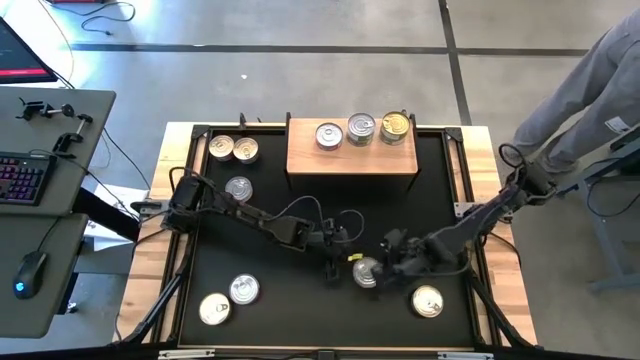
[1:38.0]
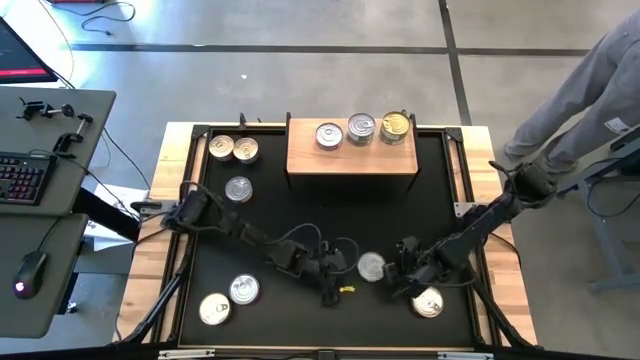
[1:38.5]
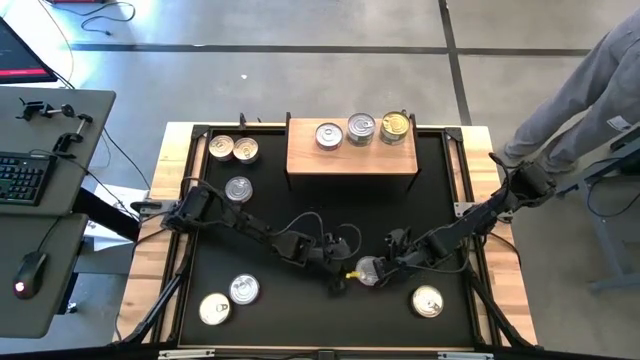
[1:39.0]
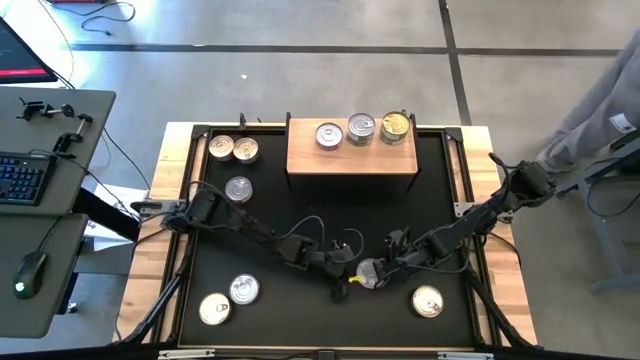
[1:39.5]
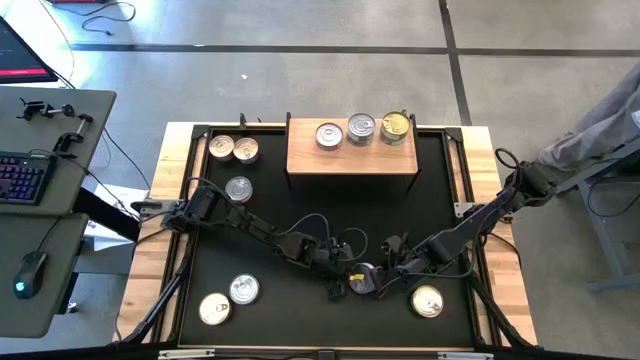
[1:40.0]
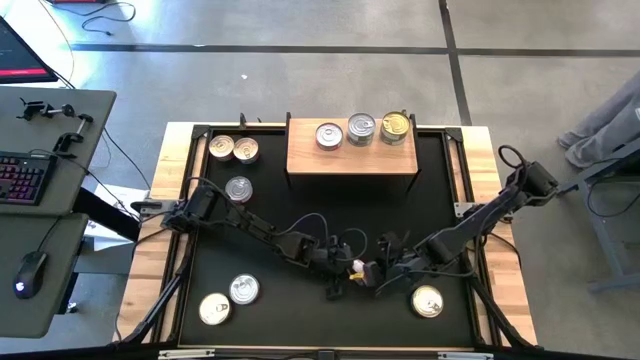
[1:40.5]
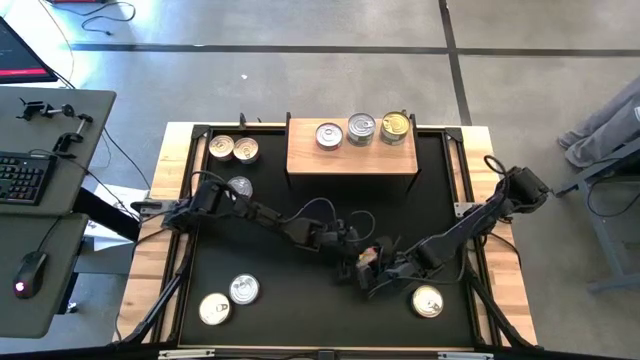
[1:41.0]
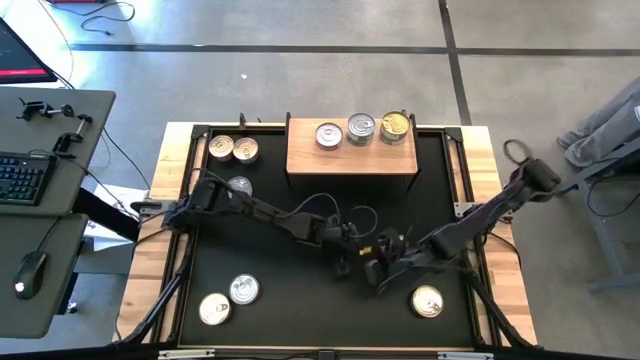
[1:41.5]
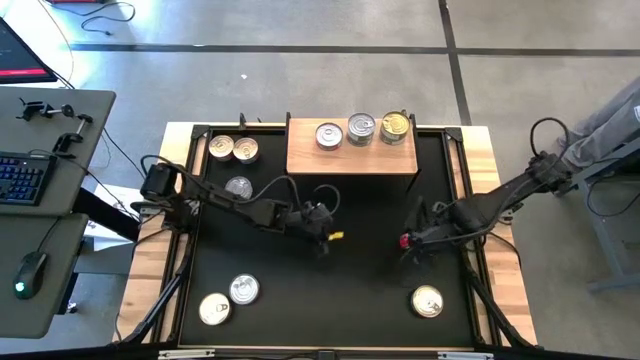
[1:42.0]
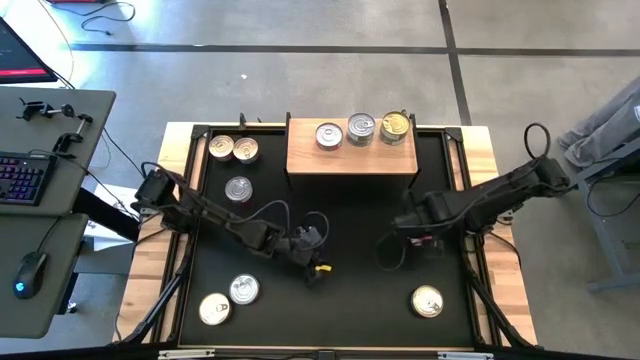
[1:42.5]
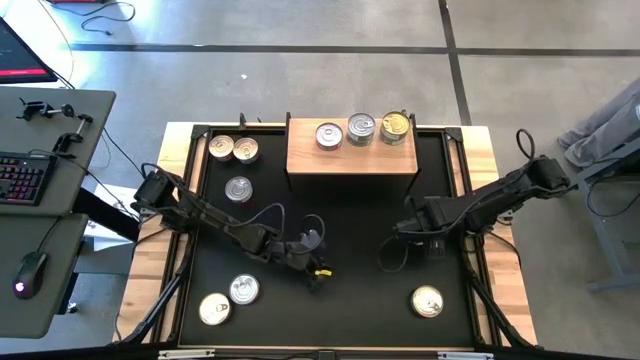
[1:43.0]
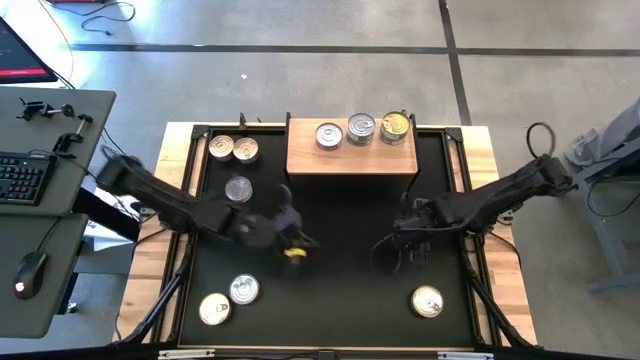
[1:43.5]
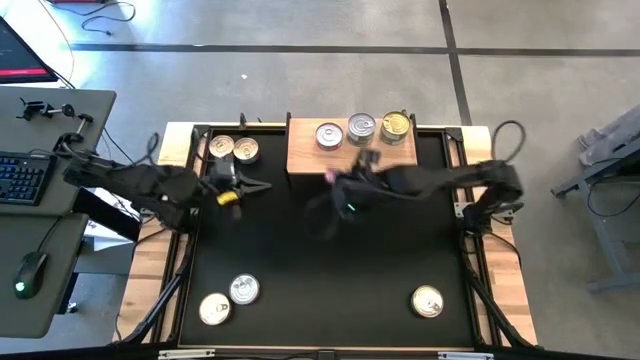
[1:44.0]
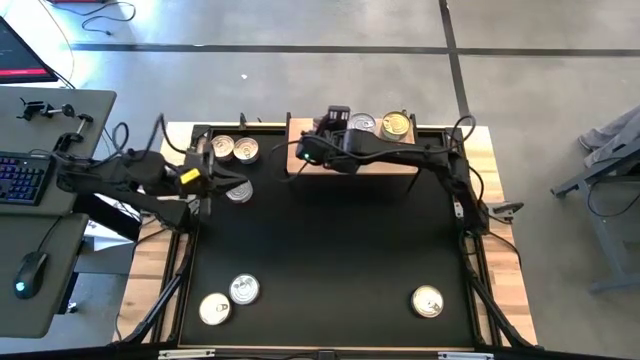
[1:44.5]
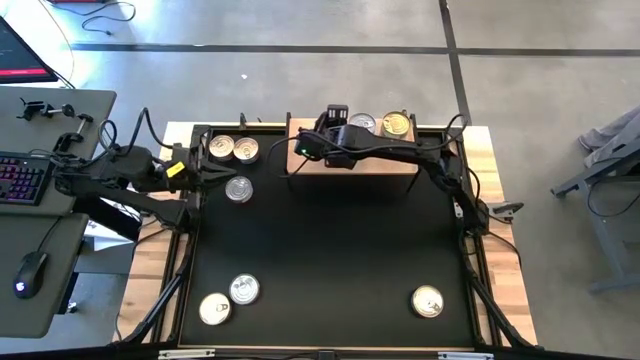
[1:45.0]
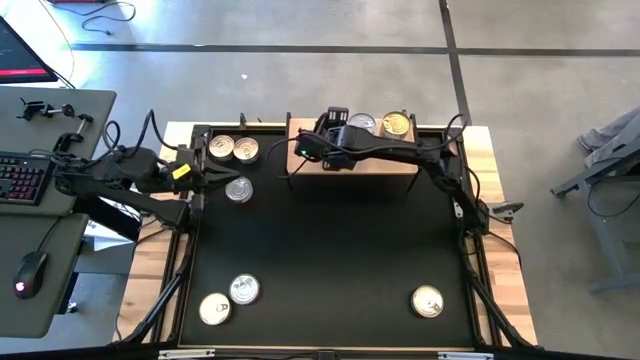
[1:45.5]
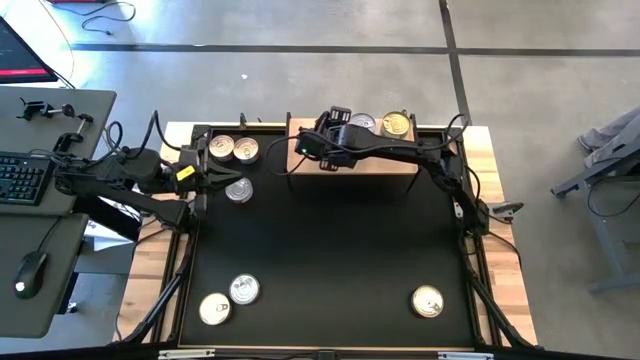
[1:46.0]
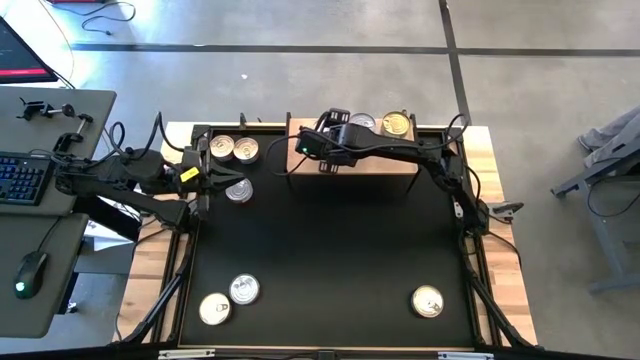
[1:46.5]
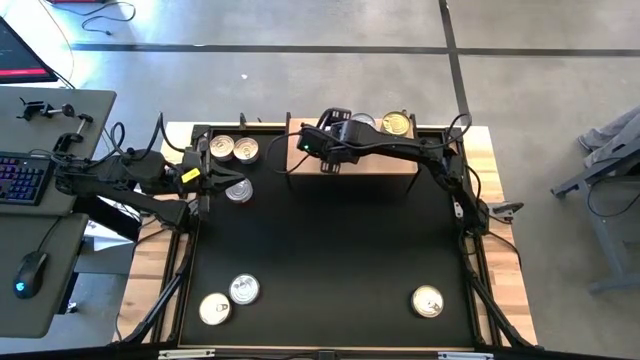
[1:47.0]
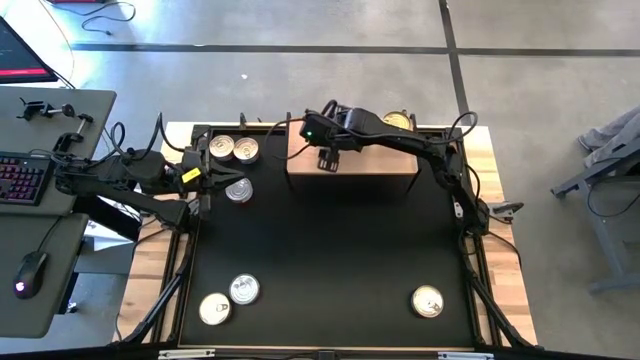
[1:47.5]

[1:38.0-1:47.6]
Task: Stack canned seafood by type on shelf
Stack the red tuna can on top of the red tuna can on the shelf

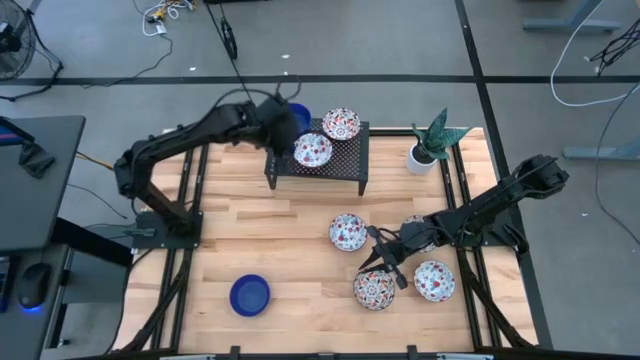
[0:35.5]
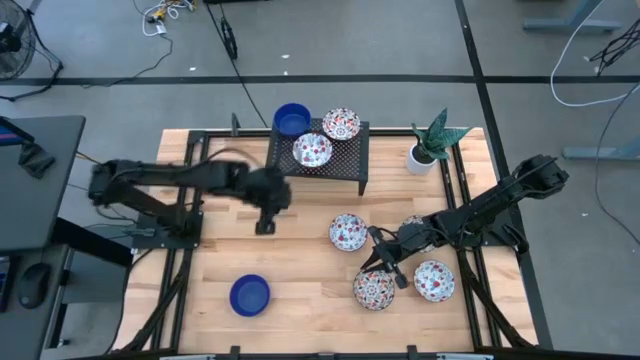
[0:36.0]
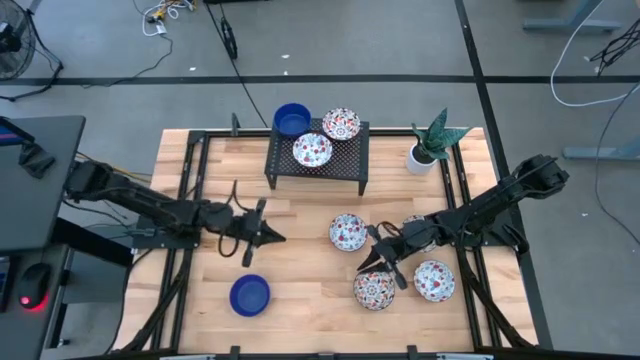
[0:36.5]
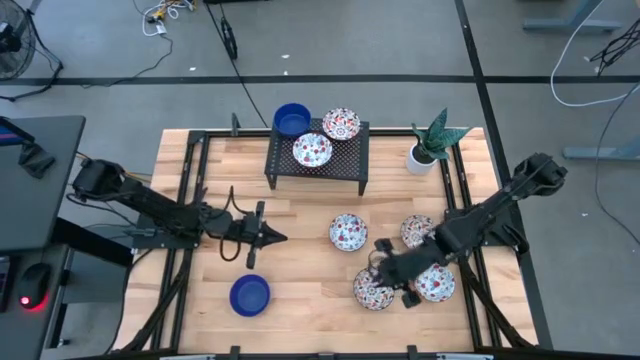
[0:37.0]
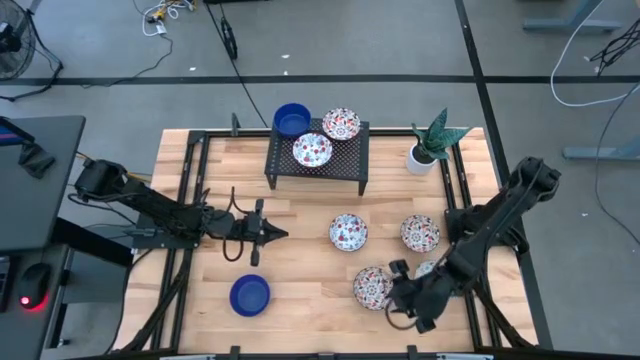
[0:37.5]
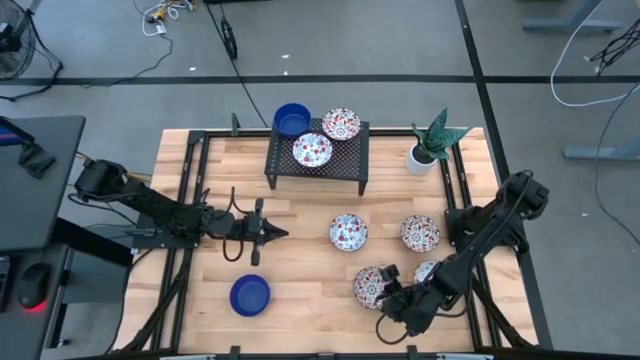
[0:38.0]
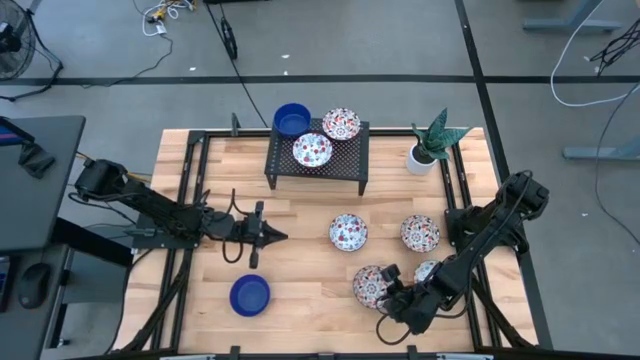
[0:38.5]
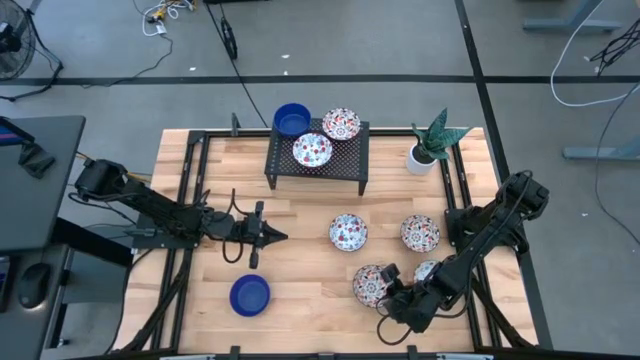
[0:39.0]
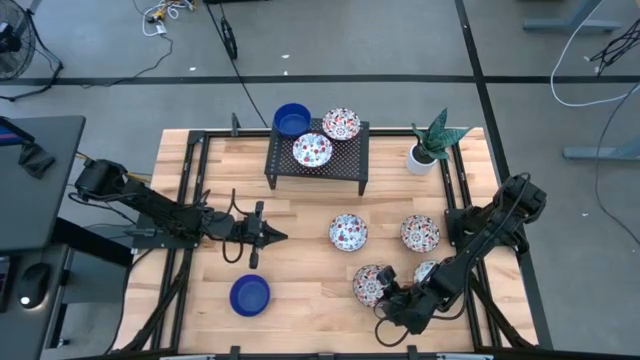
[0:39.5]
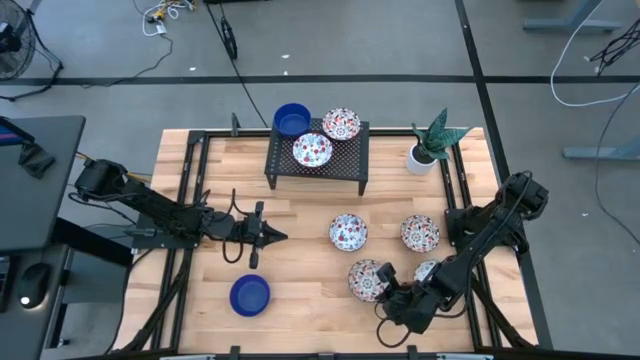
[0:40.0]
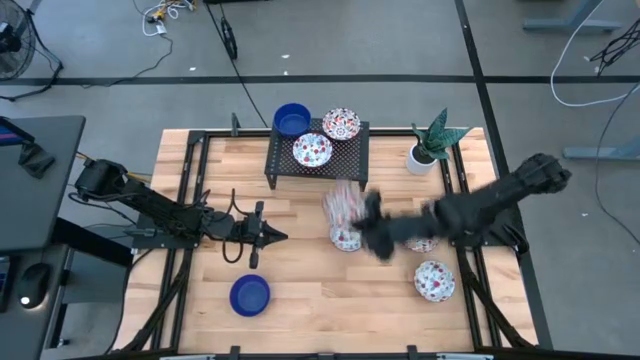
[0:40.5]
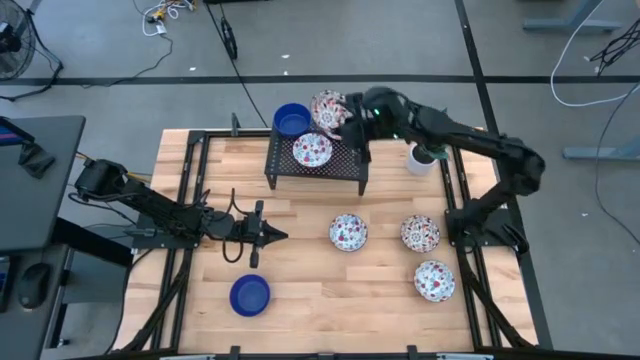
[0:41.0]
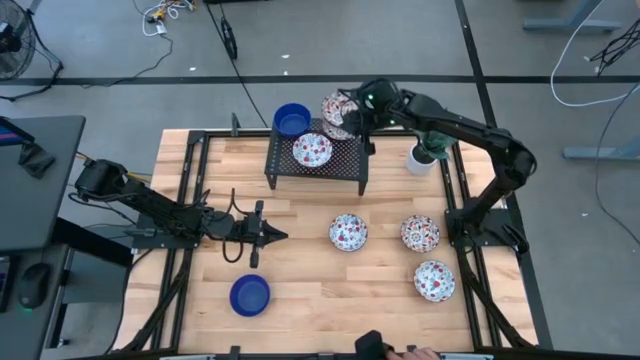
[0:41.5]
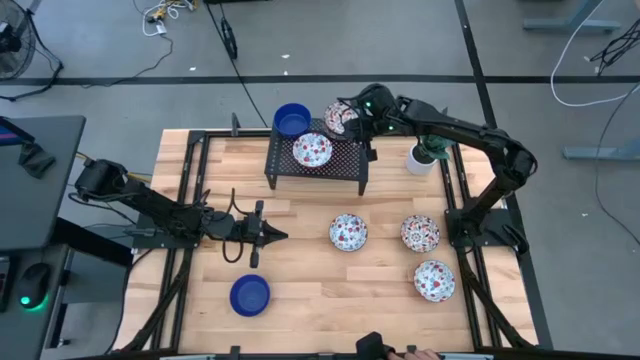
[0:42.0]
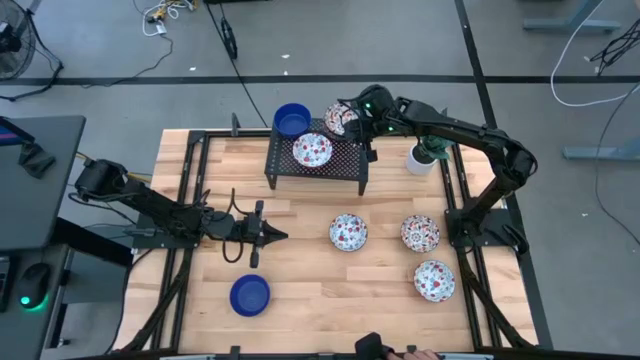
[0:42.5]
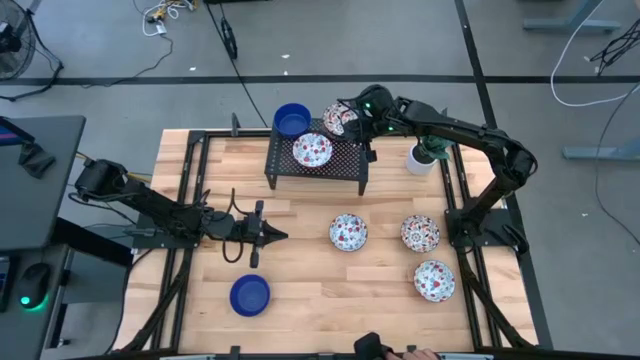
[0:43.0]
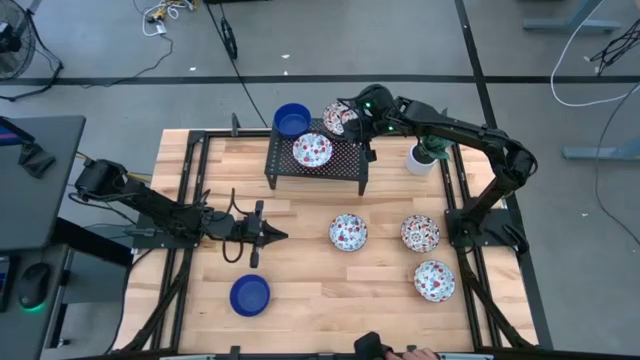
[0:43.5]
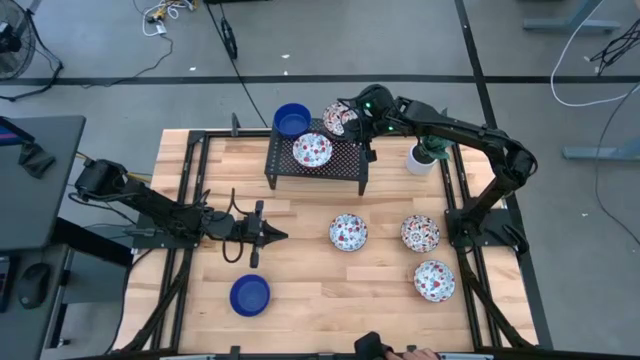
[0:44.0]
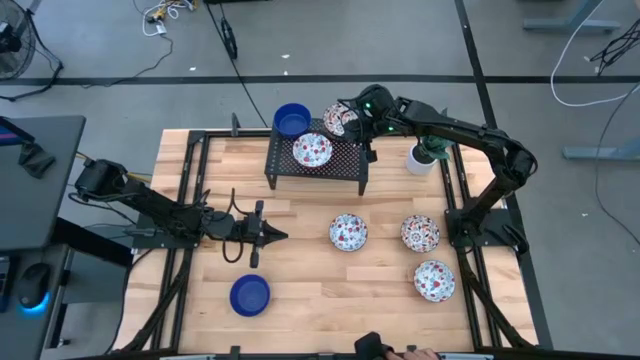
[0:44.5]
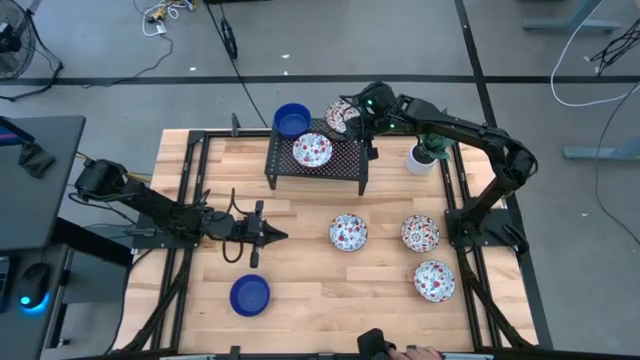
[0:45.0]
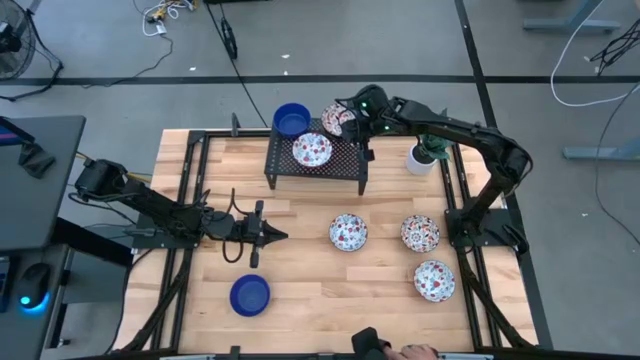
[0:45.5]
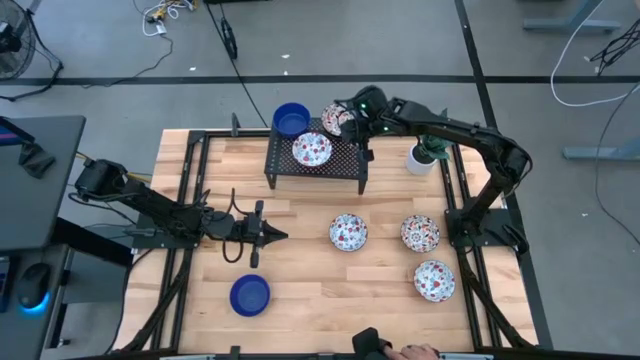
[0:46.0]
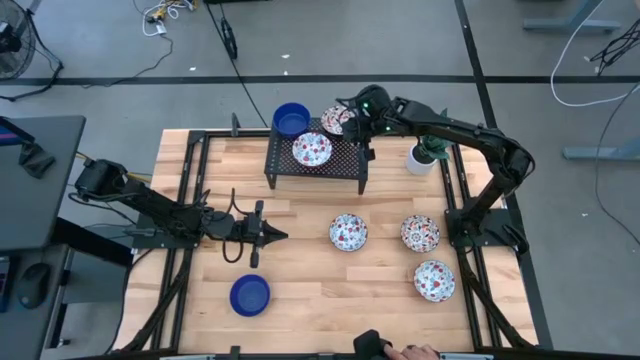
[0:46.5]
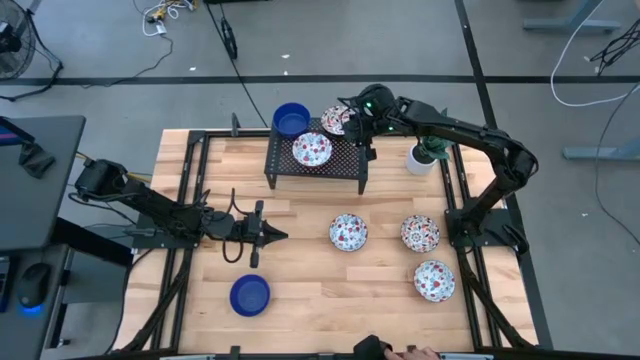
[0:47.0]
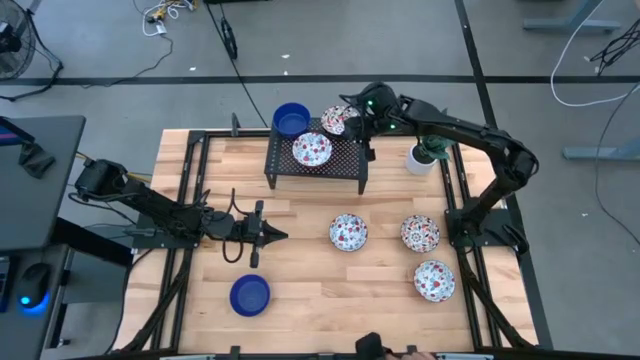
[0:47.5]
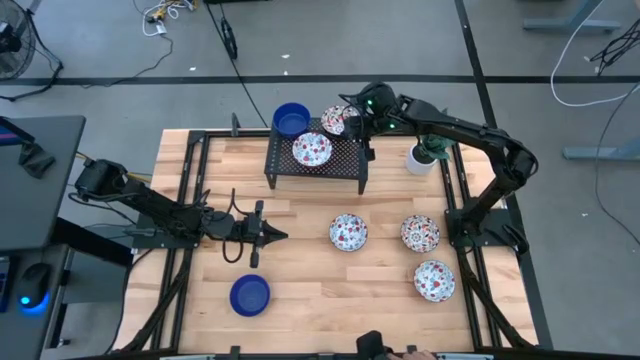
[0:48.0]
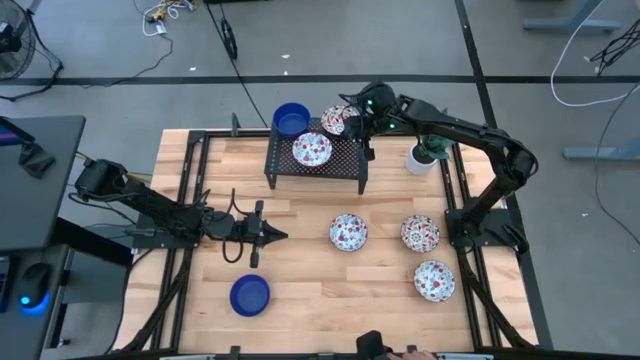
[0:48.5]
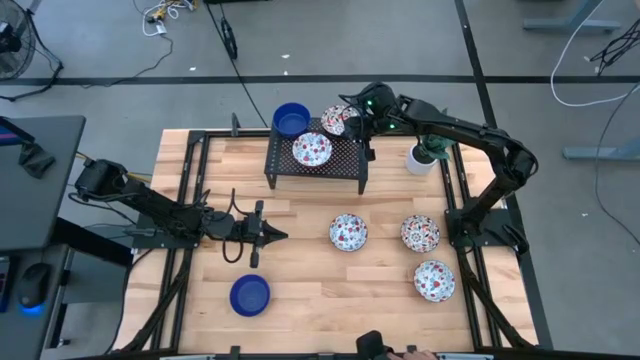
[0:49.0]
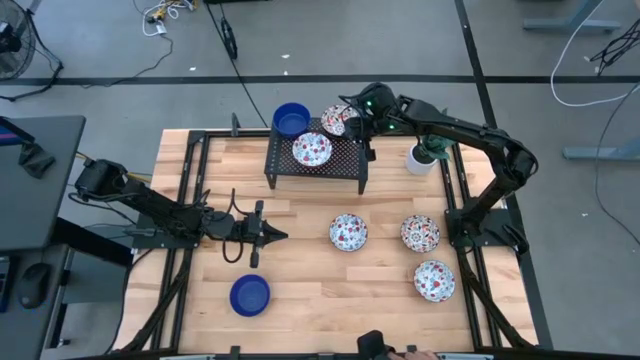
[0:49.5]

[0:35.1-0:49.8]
Task: Pick & Place Mini bowls
Stack the bottom orange bowl on top of the other orange bowl on the shelf
